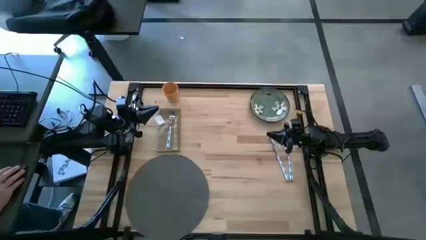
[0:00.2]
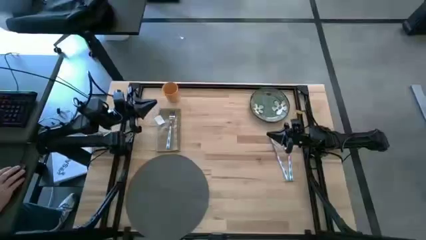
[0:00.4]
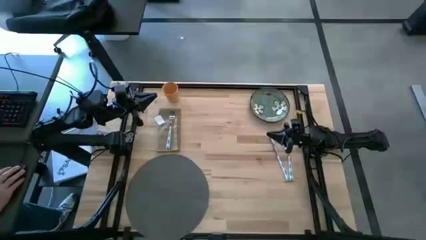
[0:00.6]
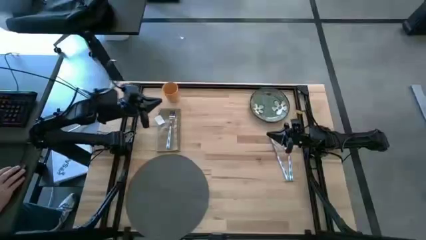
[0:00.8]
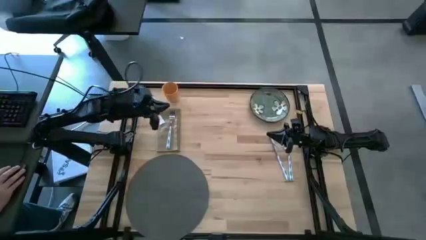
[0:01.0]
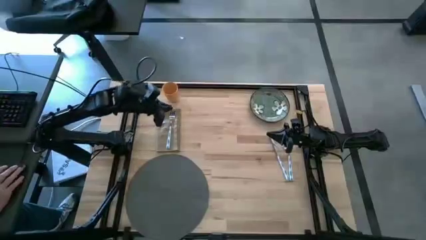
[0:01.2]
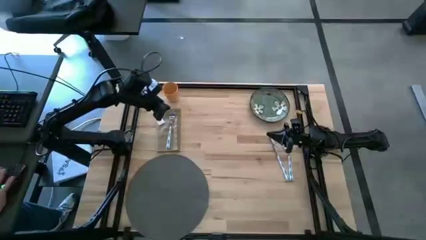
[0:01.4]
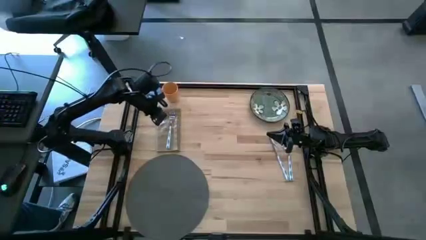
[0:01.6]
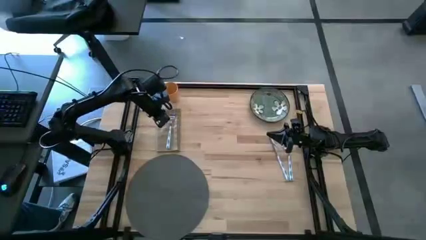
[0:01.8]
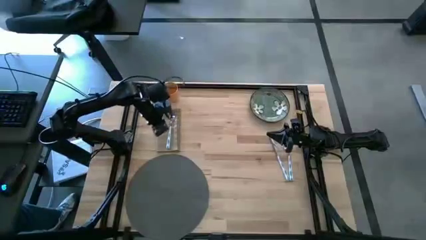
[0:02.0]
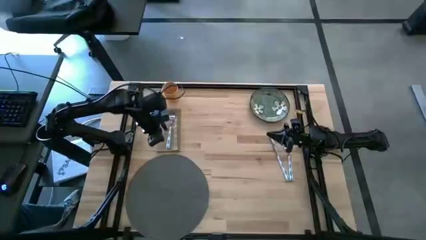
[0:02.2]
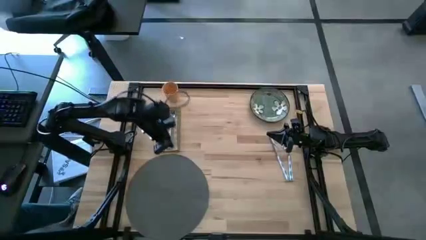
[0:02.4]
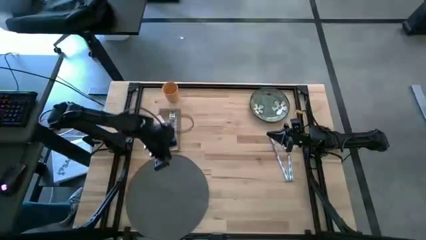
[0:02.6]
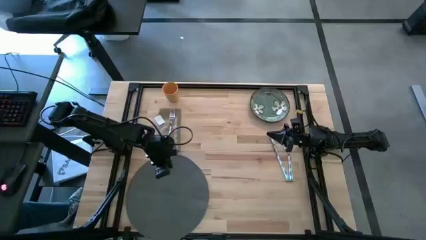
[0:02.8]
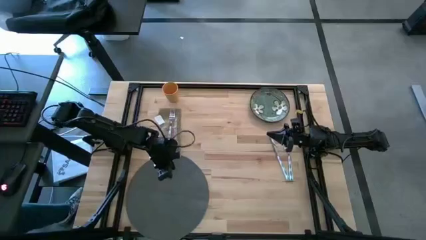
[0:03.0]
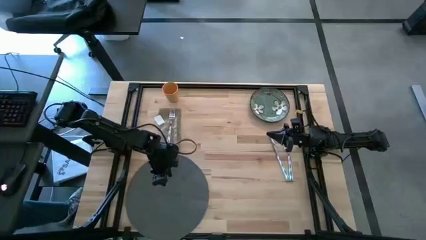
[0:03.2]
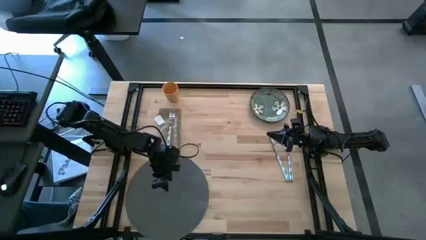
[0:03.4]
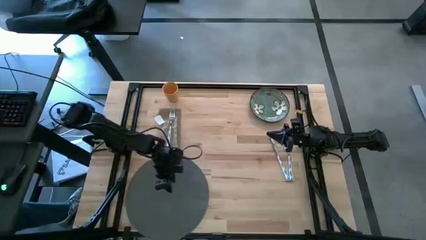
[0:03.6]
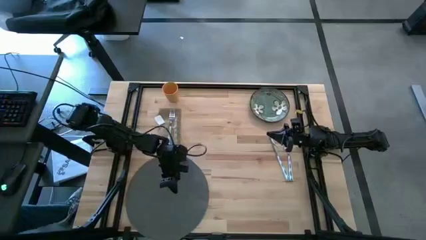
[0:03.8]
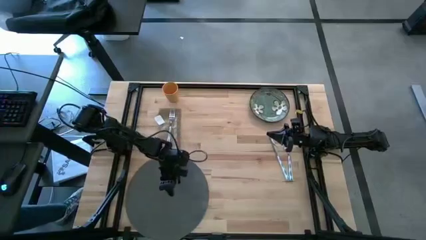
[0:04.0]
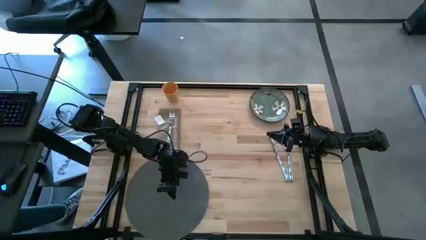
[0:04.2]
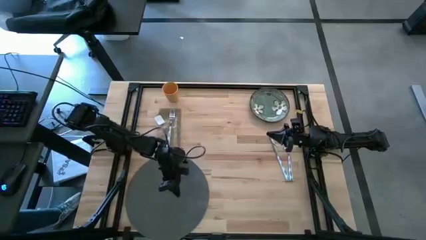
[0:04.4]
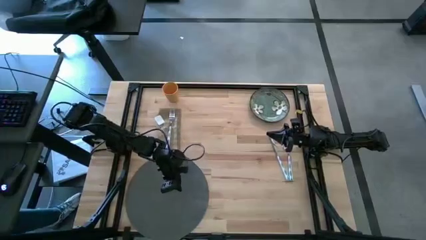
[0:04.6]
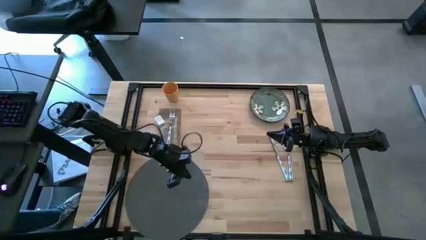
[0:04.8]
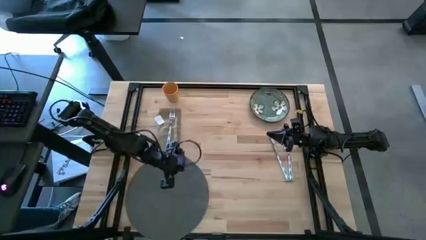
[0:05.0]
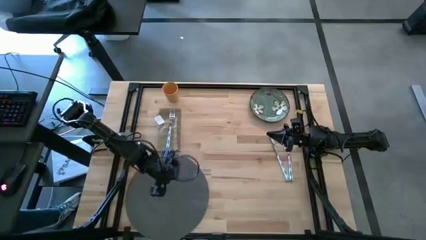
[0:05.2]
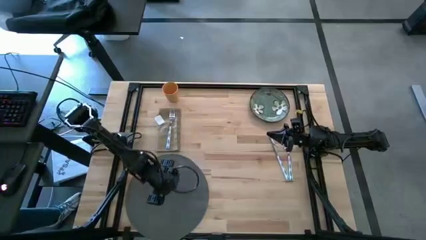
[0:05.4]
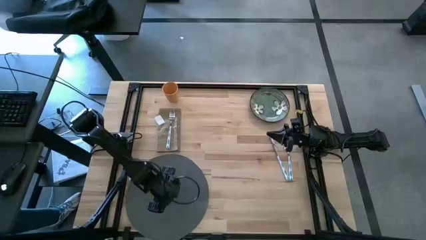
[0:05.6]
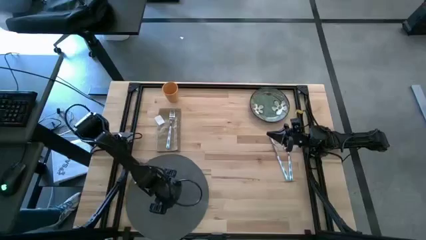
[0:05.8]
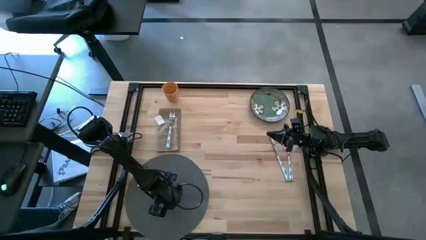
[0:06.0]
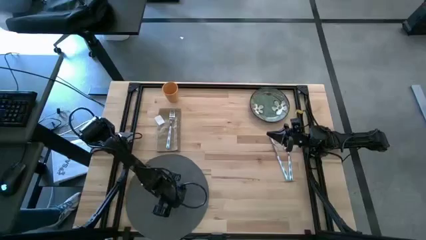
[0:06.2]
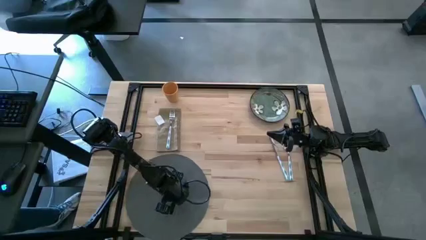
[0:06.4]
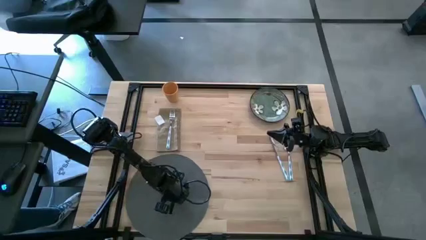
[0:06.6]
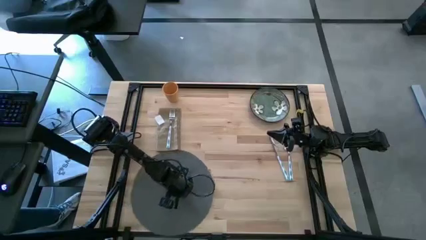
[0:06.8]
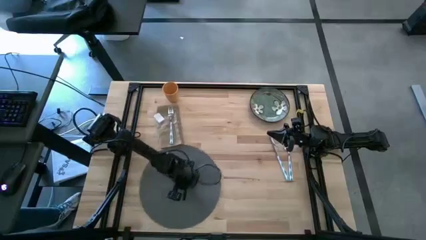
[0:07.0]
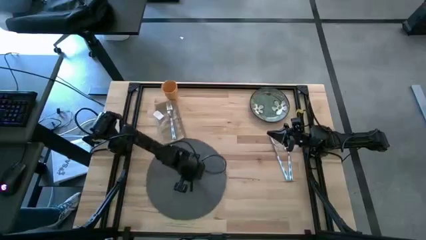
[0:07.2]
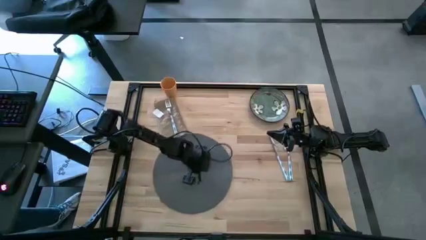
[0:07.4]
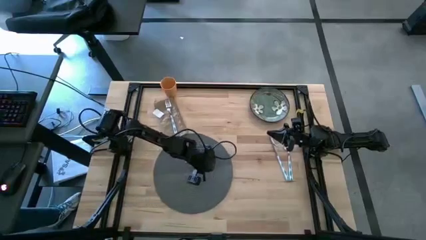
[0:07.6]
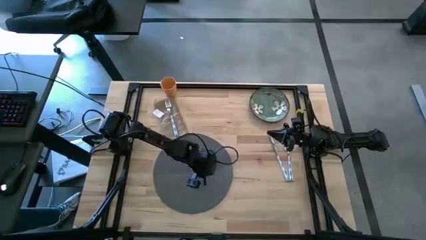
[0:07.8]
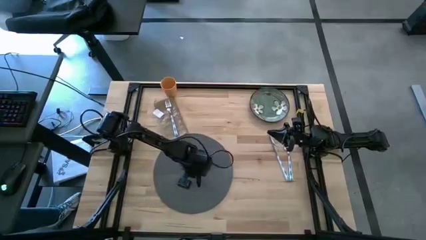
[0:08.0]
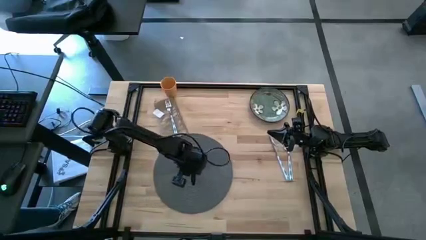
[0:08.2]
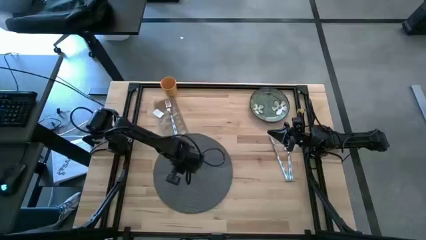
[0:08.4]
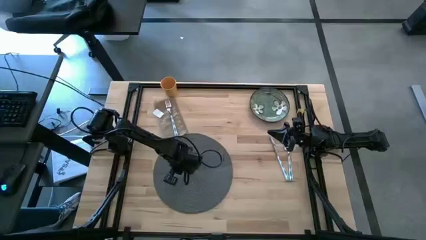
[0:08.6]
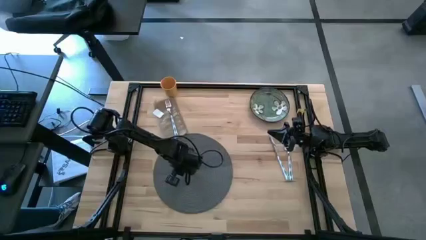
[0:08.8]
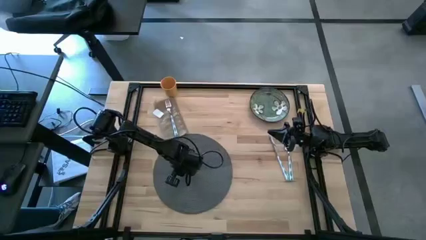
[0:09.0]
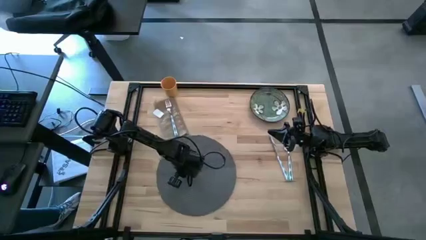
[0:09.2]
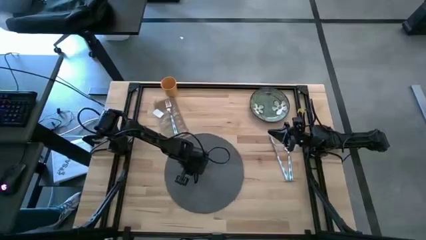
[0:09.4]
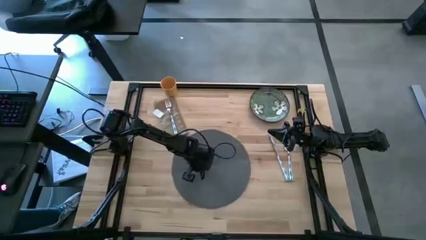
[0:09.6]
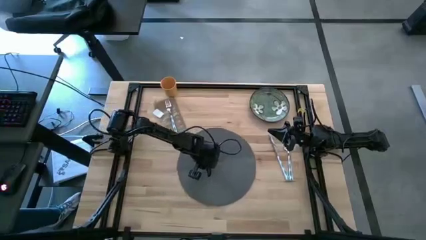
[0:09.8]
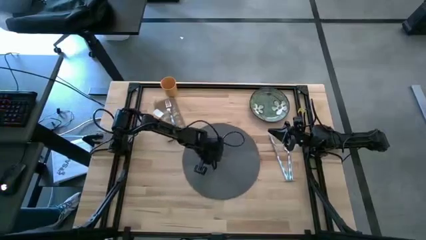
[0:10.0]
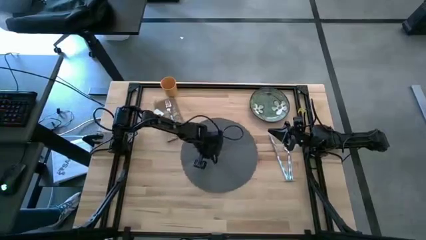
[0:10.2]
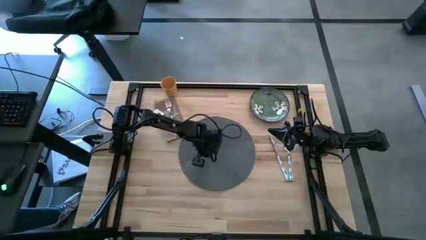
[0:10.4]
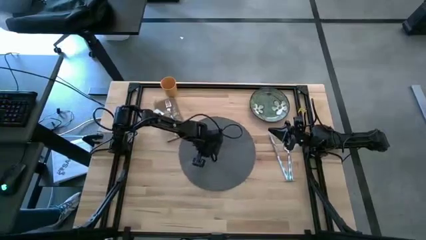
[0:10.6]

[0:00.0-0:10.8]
Task: Set table place
Move the gray table mat to the center of the table
